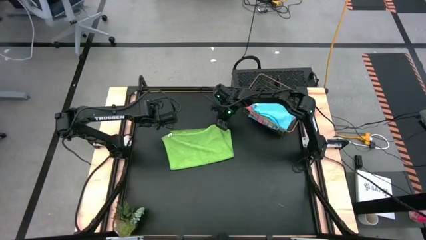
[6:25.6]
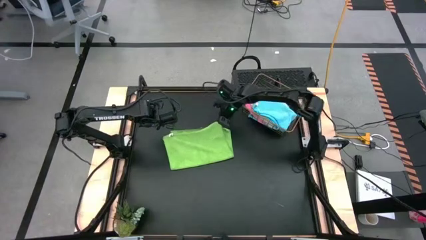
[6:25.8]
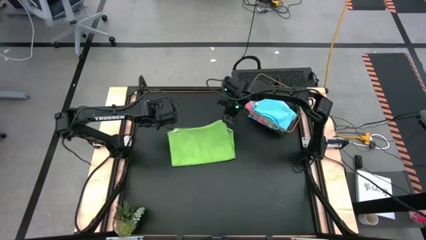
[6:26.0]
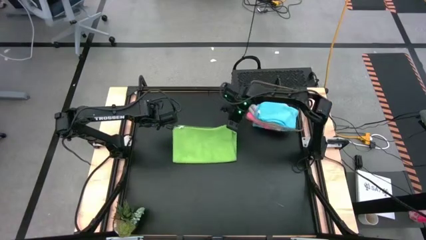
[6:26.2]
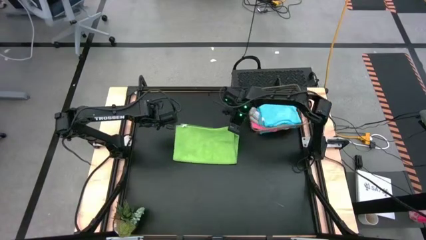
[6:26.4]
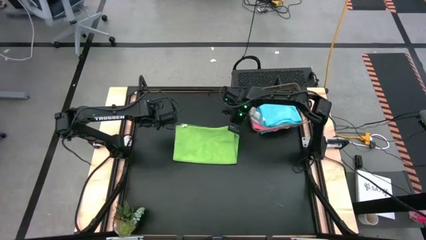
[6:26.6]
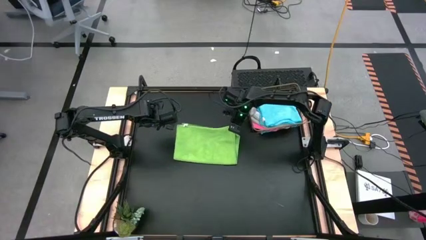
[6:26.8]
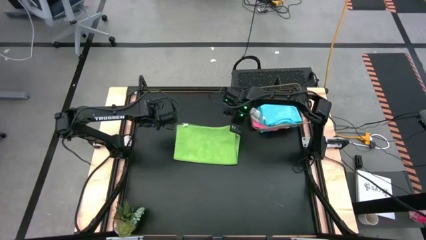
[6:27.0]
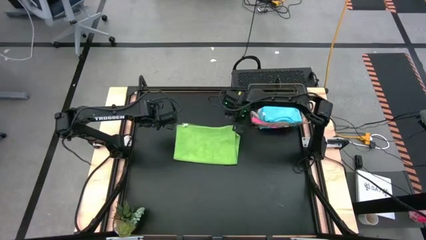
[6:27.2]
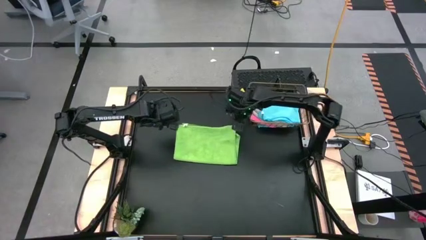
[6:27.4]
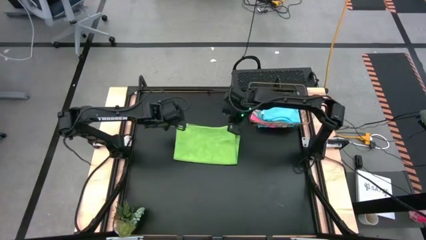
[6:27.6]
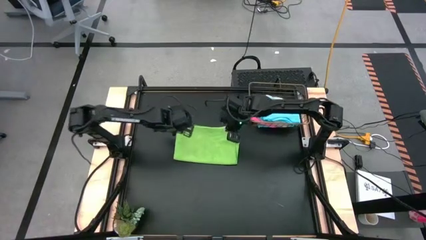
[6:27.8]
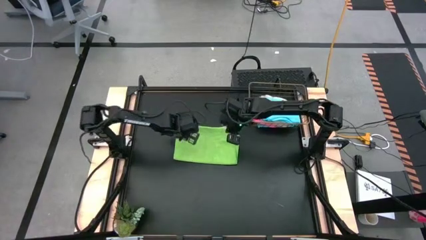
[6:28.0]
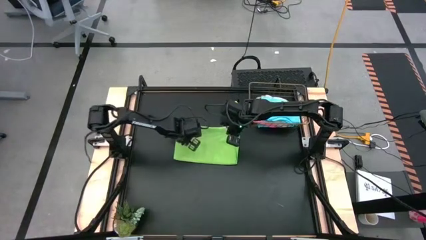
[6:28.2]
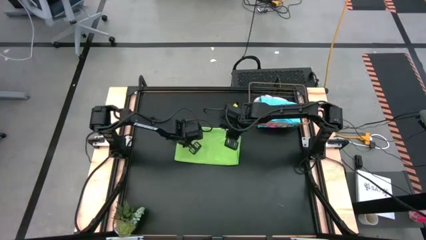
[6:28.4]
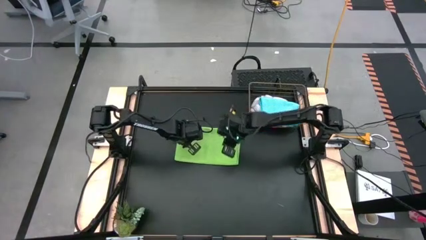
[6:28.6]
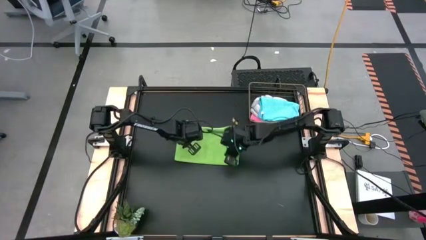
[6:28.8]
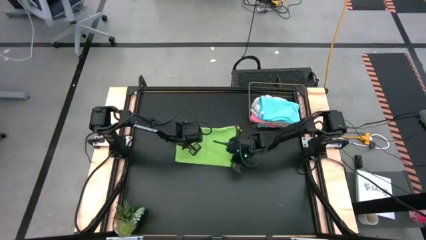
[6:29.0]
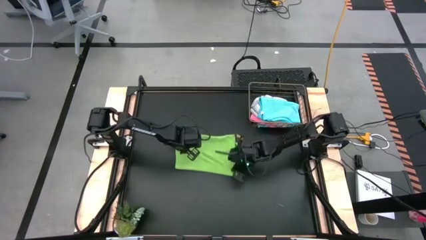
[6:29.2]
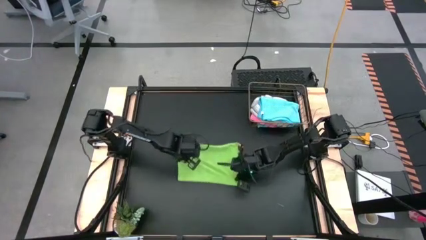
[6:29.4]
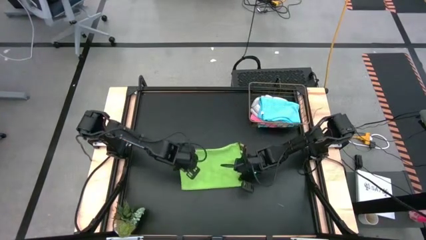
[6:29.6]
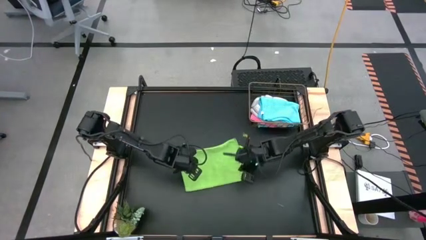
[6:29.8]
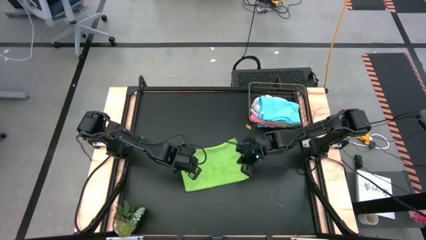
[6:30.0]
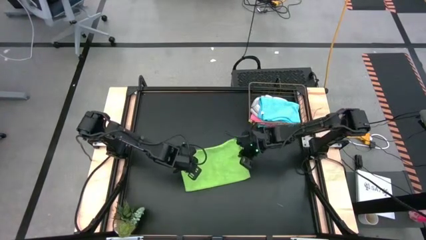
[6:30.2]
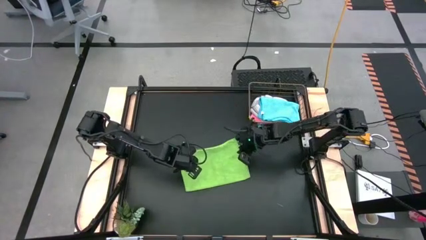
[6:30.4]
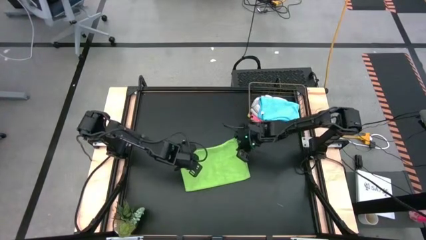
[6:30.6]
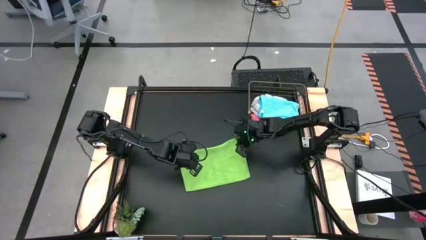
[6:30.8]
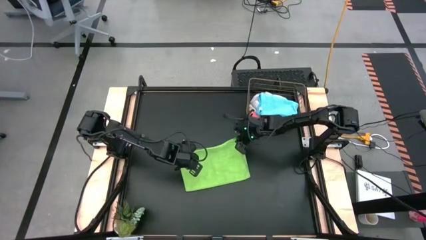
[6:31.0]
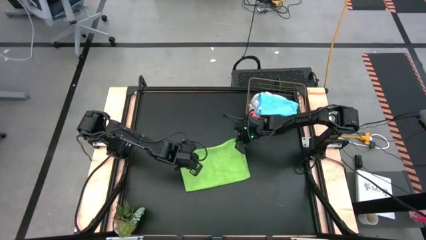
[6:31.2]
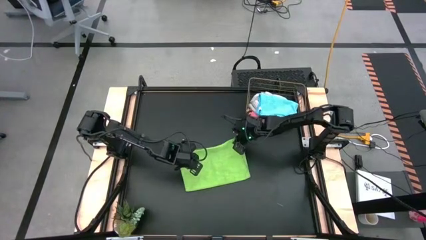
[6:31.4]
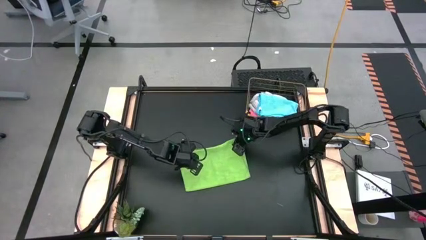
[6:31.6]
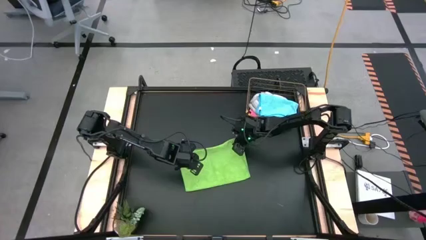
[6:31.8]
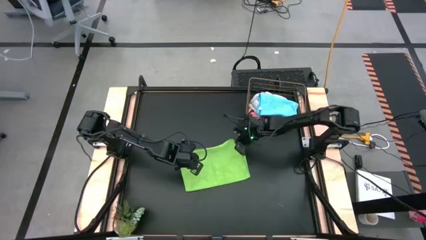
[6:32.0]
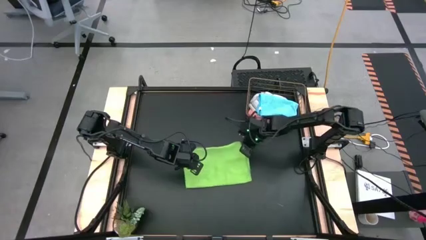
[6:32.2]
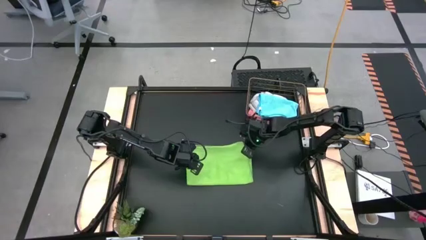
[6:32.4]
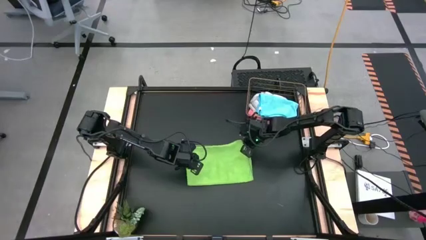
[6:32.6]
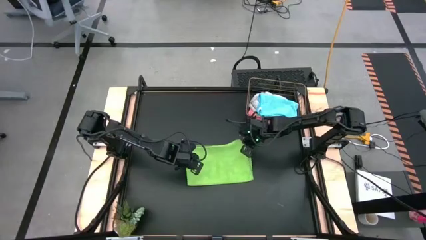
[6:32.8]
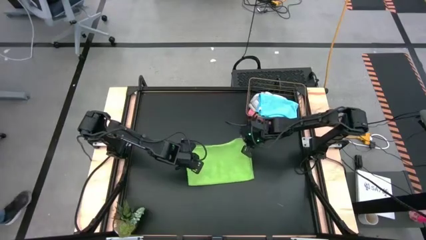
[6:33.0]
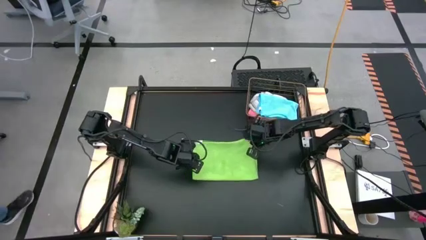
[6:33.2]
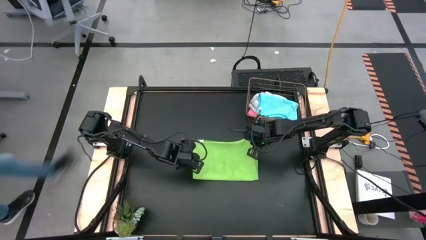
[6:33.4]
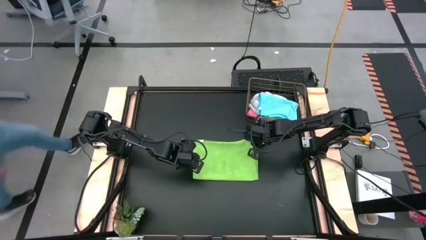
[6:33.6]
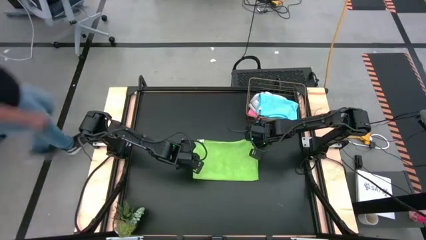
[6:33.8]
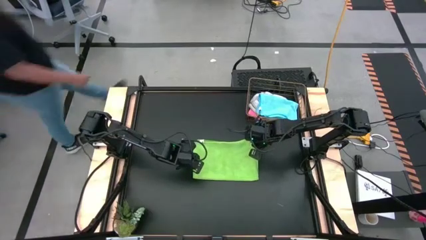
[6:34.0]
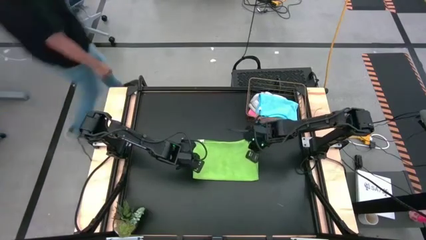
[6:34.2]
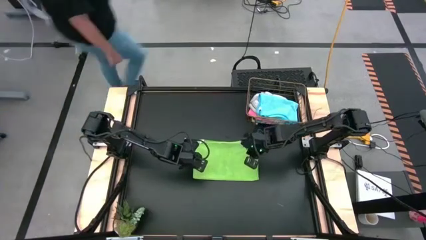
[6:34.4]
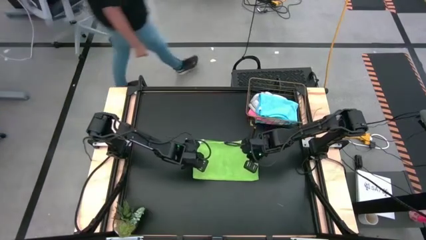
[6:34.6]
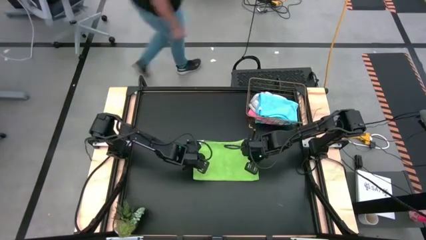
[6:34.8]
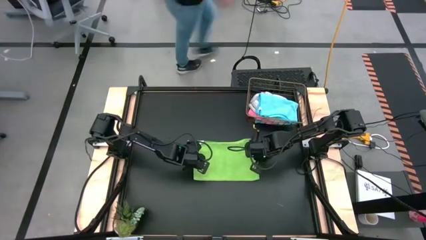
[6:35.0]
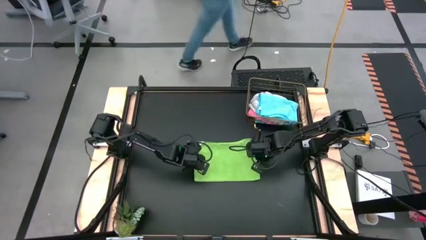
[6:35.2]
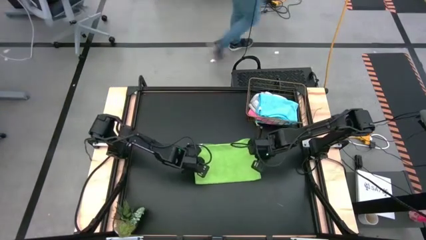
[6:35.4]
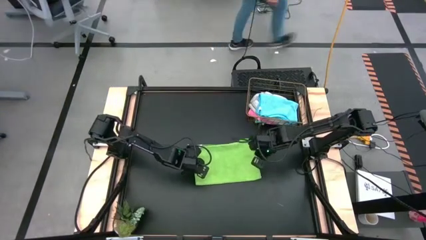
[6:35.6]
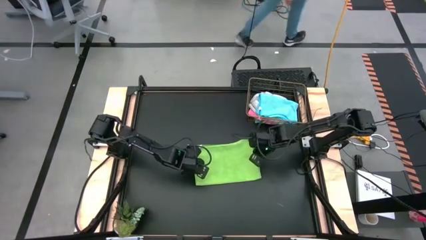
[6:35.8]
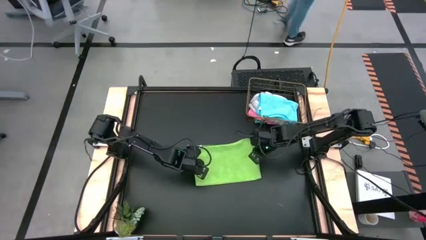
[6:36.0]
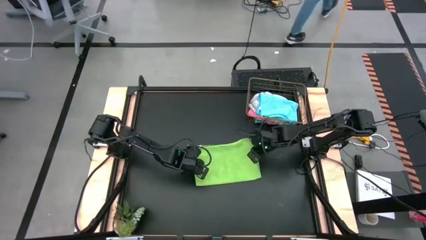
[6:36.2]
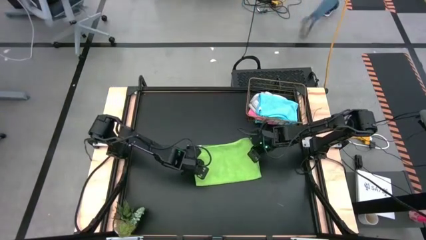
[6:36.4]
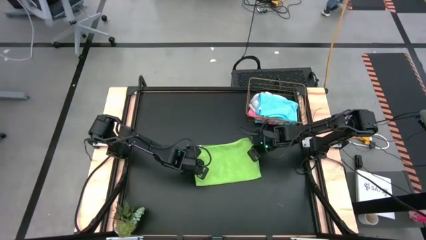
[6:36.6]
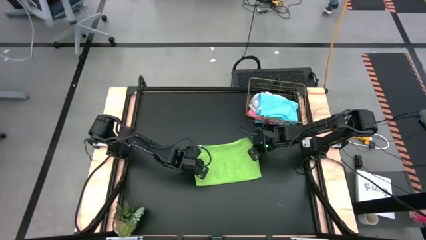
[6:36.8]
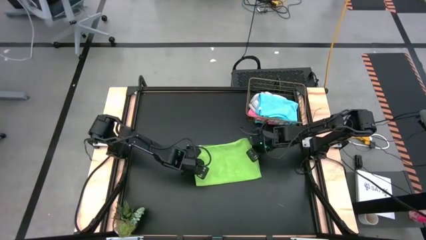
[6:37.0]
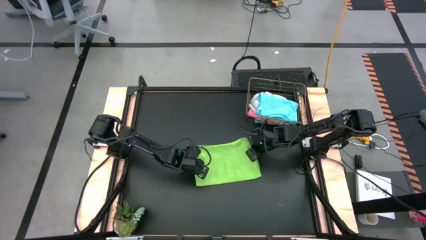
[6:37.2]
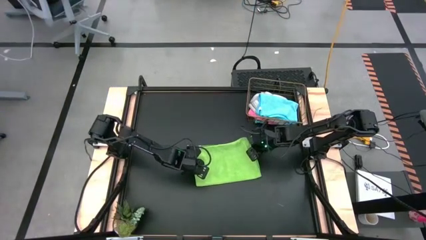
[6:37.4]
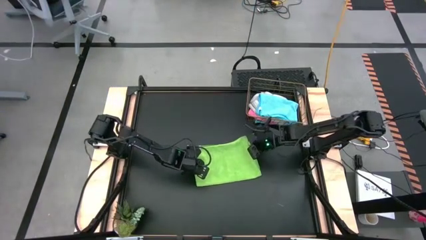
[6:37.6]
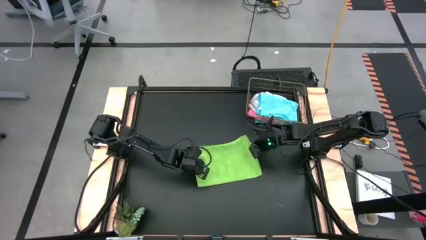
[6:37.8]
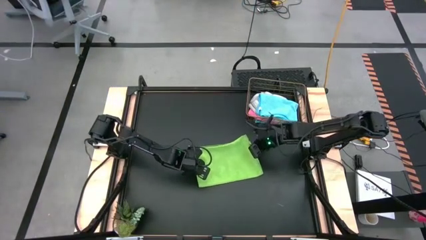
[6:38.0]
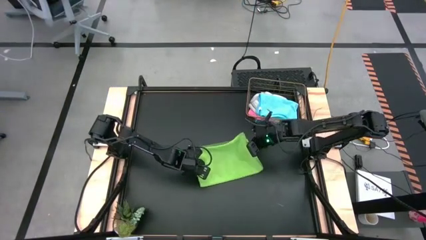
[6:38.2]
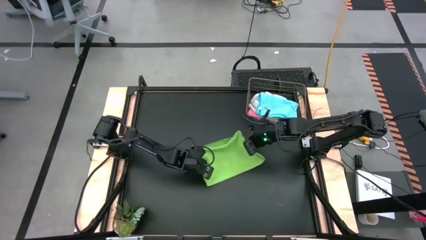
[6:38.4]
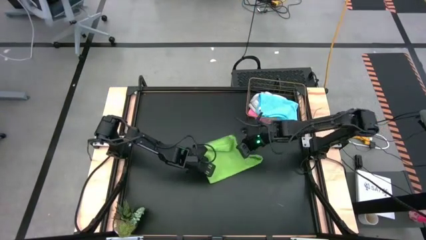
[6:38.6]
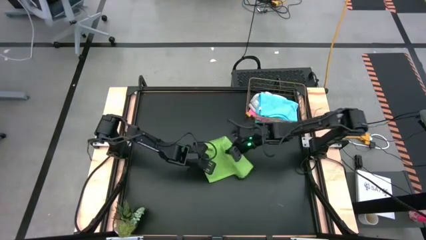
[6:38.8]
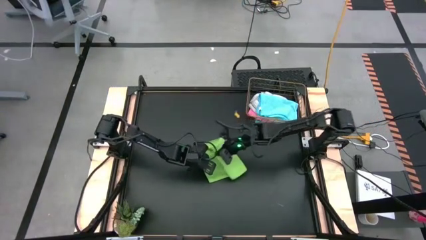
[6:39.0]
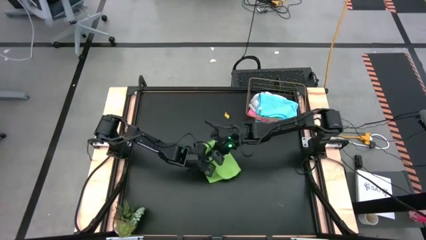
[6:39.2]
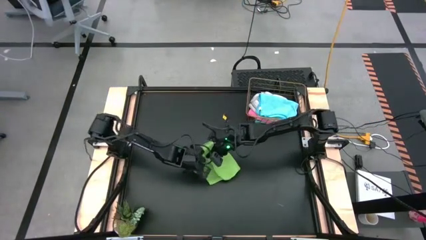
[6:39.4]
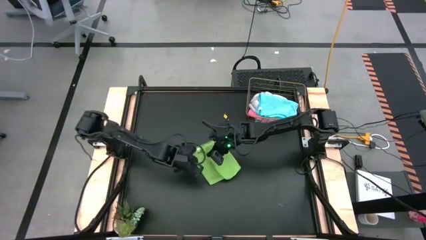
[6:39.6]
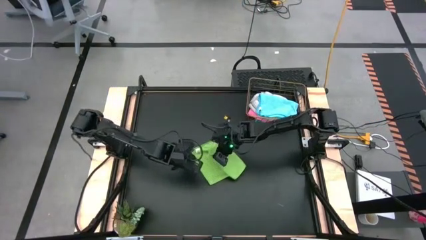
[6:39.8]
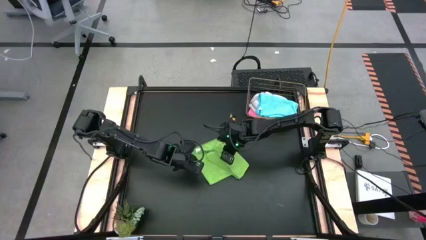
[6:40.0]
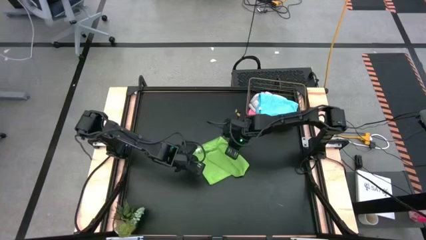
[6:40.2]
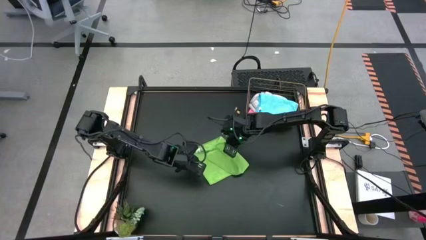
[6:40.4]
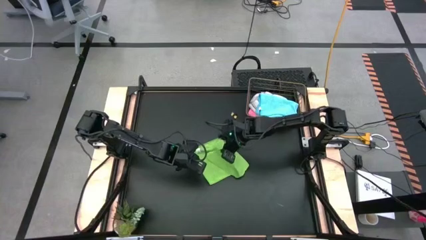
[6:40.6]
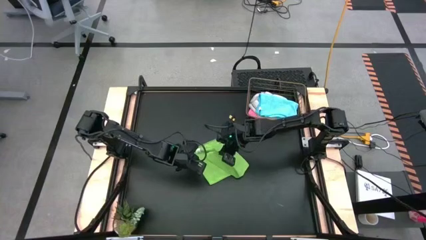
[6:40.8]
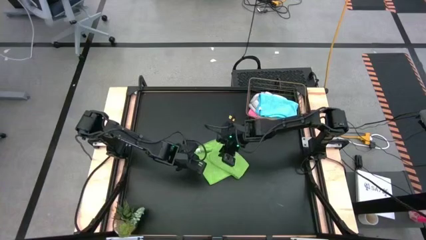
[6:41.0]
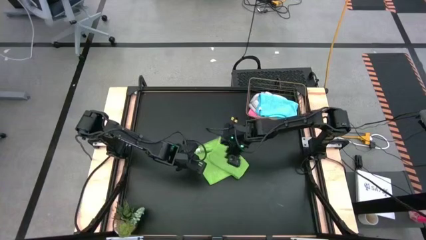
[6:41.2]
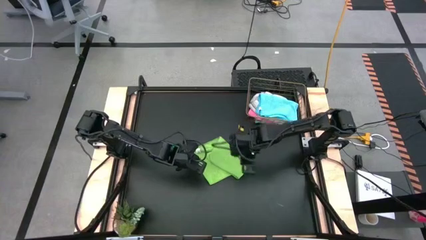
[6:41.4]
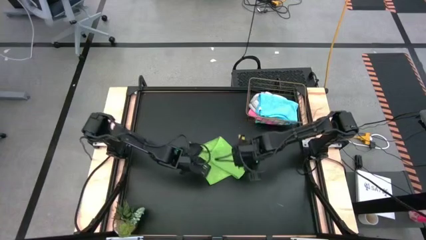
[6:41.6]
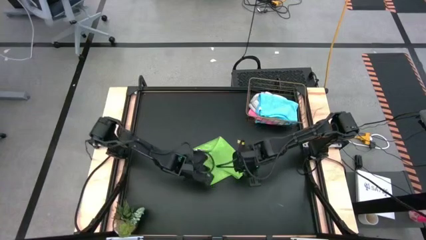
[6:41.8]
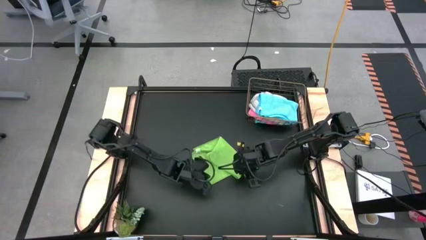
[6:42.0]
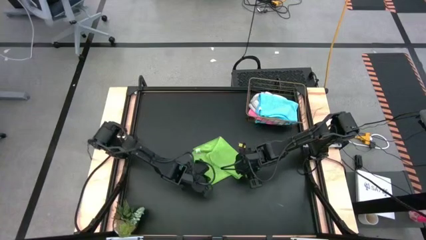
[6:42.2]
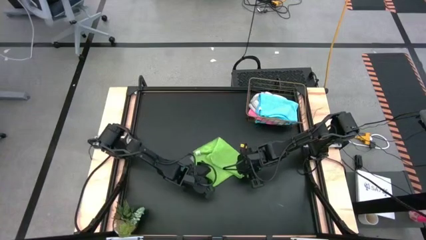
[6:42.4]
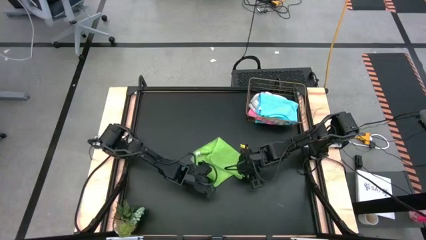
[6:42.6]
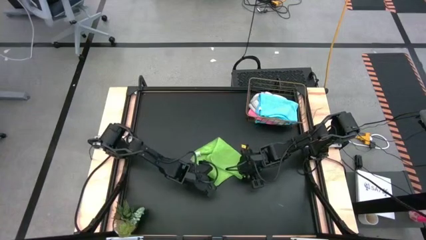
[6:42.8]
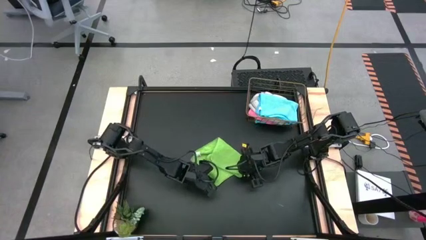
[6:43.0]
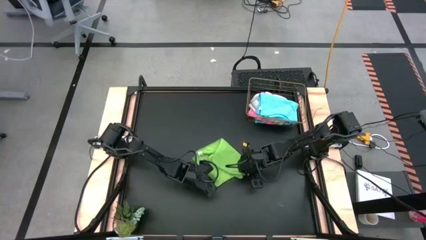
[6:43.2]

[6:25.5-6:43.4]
Task: Fold microfiber towels
Fold the green towel
